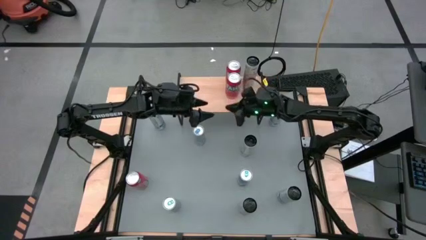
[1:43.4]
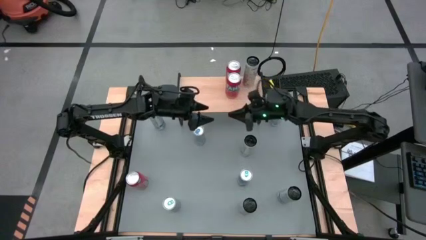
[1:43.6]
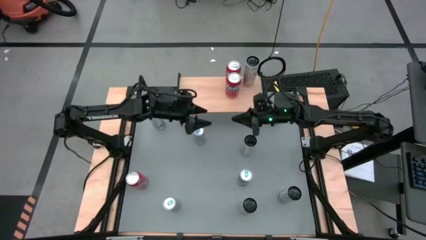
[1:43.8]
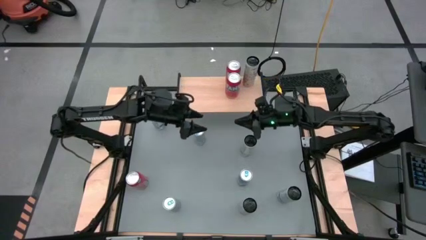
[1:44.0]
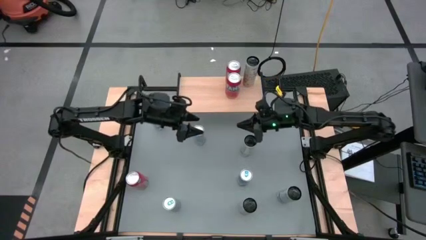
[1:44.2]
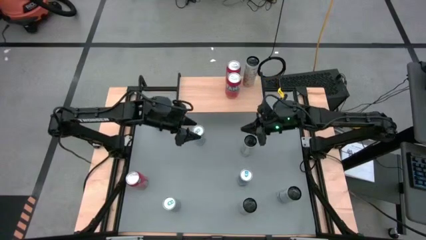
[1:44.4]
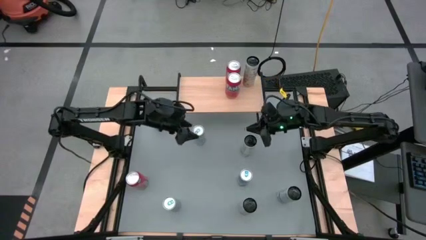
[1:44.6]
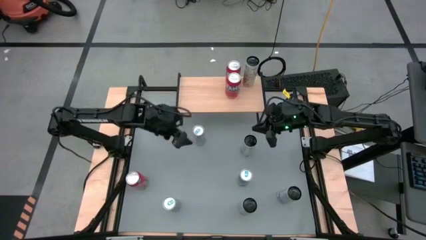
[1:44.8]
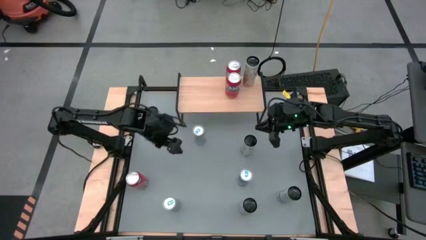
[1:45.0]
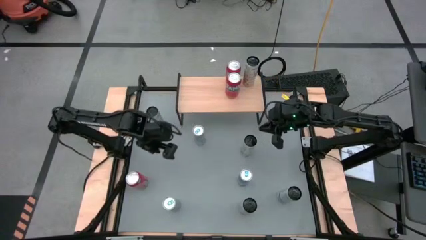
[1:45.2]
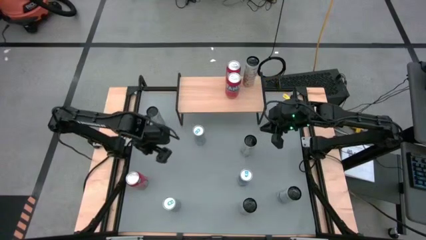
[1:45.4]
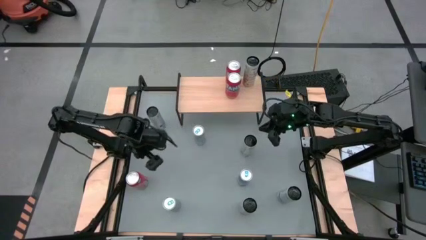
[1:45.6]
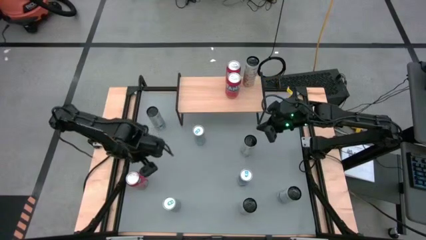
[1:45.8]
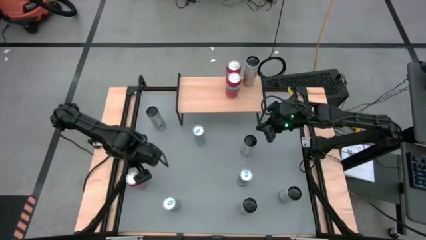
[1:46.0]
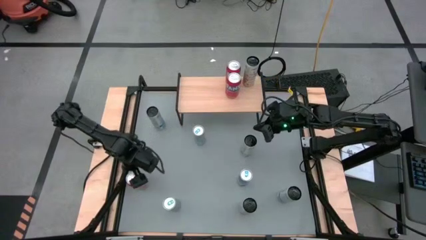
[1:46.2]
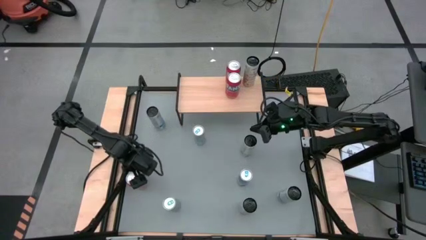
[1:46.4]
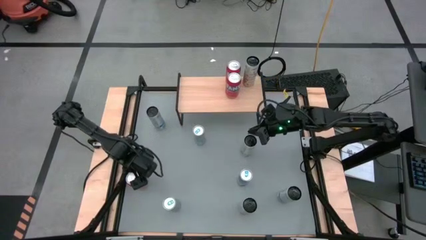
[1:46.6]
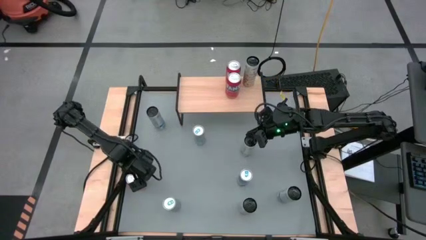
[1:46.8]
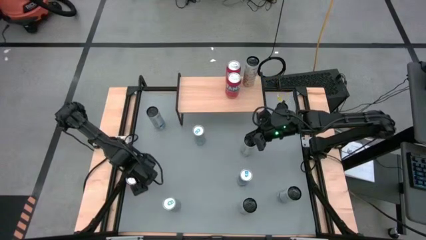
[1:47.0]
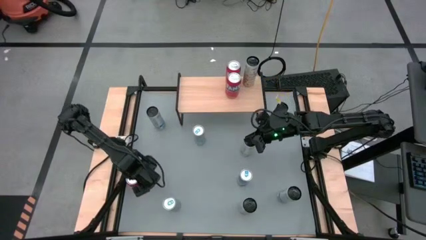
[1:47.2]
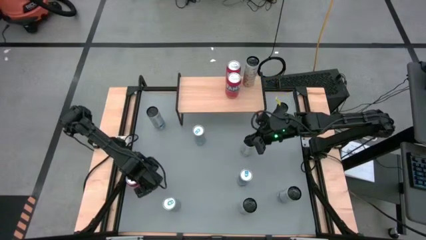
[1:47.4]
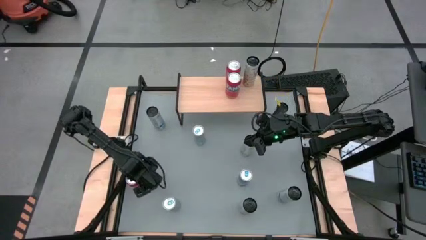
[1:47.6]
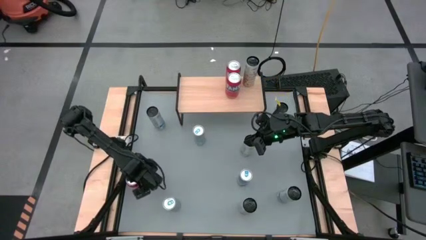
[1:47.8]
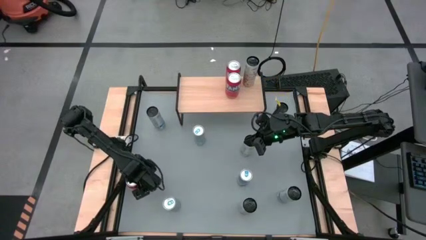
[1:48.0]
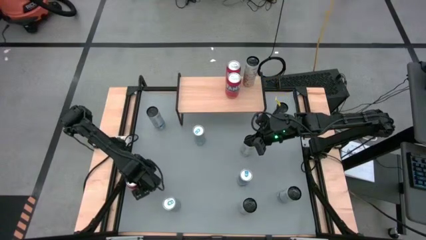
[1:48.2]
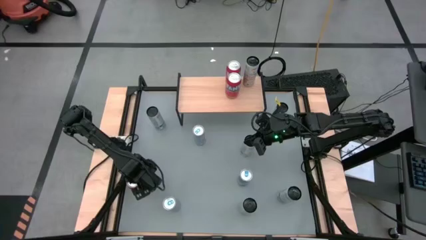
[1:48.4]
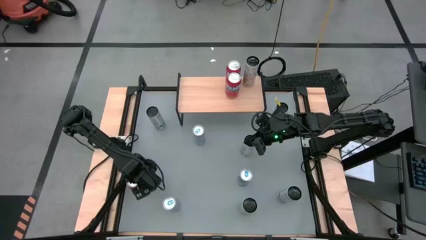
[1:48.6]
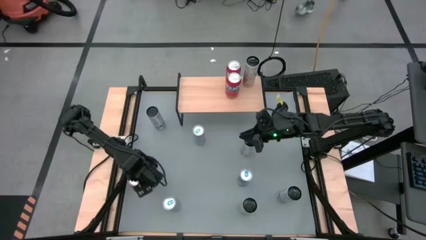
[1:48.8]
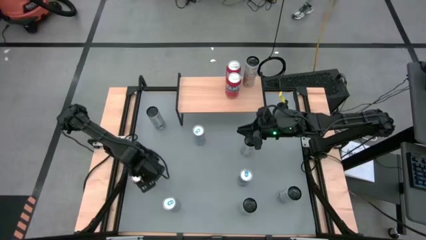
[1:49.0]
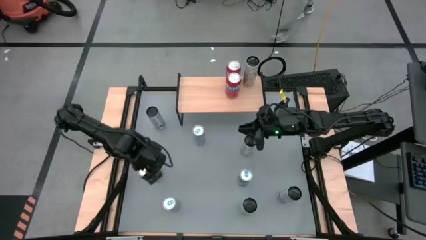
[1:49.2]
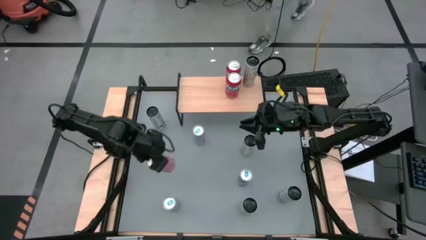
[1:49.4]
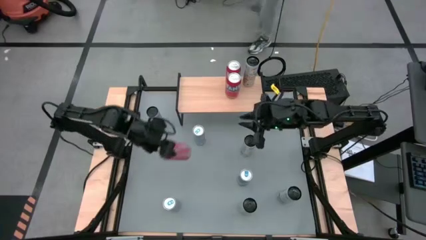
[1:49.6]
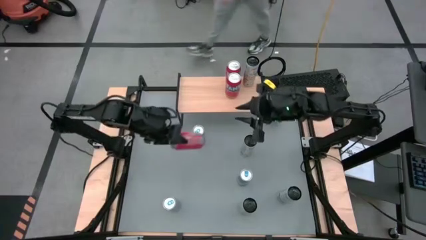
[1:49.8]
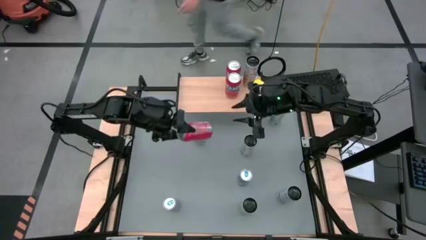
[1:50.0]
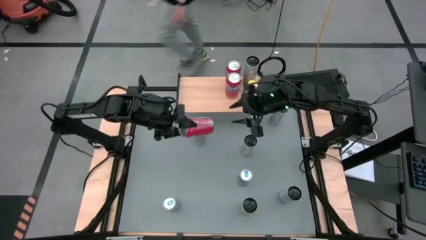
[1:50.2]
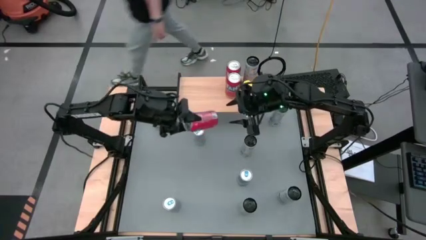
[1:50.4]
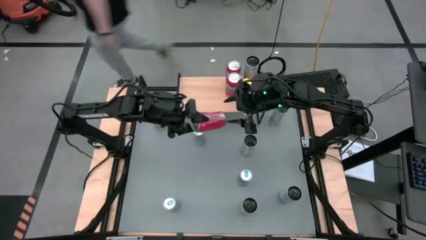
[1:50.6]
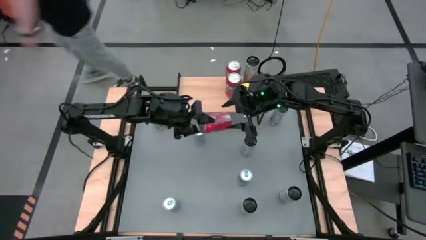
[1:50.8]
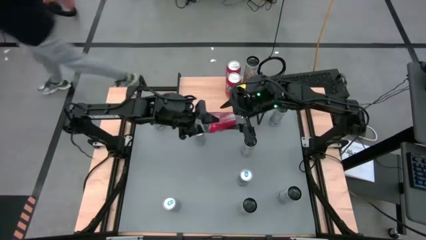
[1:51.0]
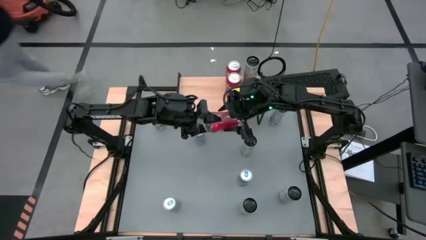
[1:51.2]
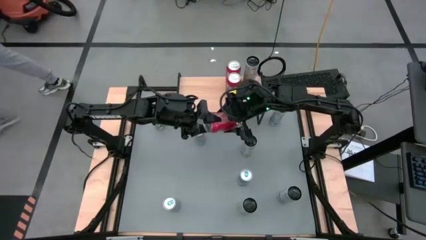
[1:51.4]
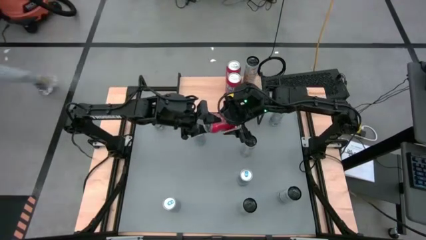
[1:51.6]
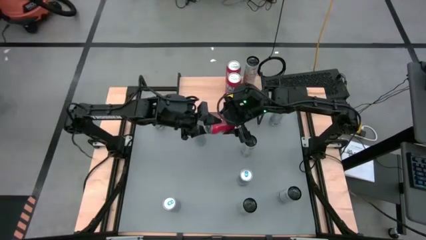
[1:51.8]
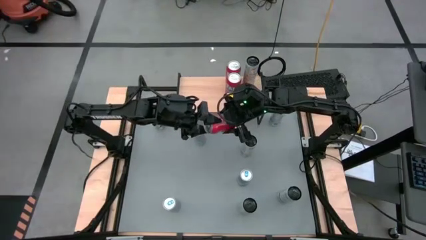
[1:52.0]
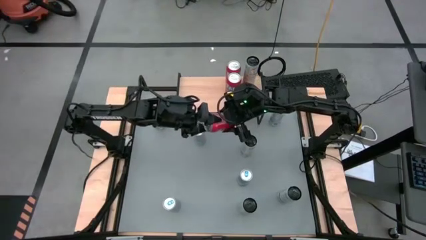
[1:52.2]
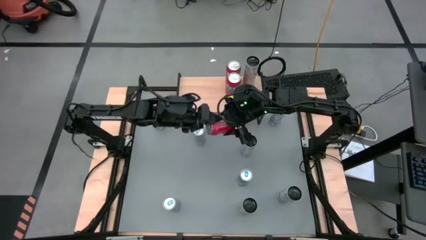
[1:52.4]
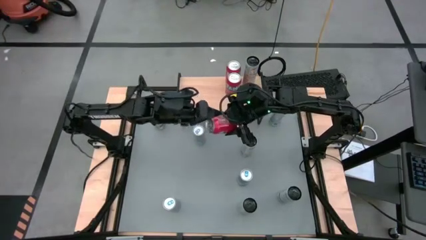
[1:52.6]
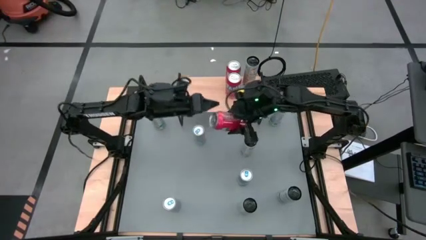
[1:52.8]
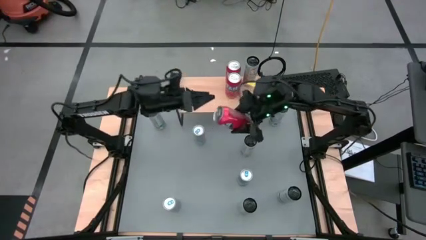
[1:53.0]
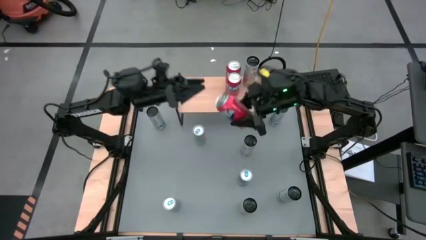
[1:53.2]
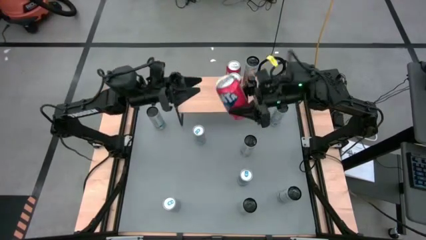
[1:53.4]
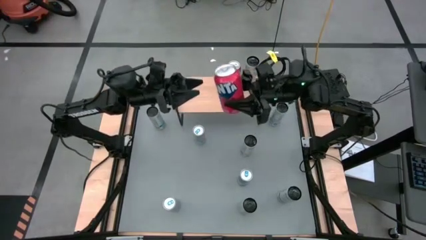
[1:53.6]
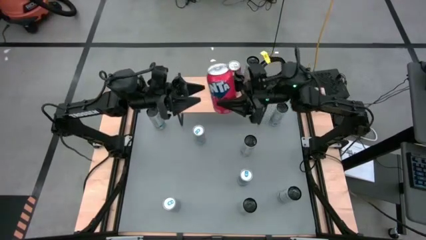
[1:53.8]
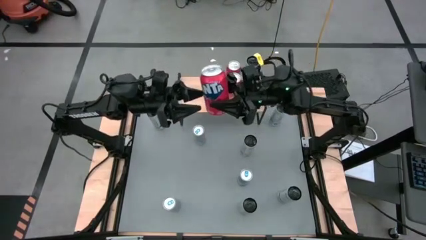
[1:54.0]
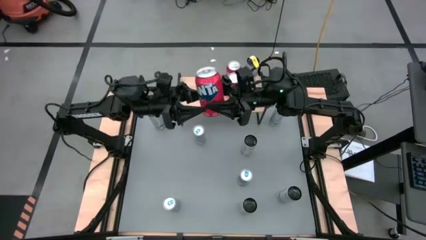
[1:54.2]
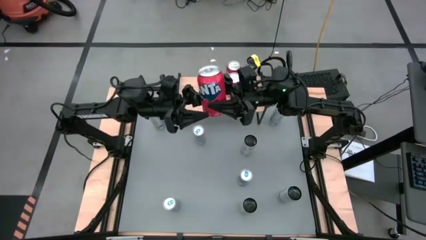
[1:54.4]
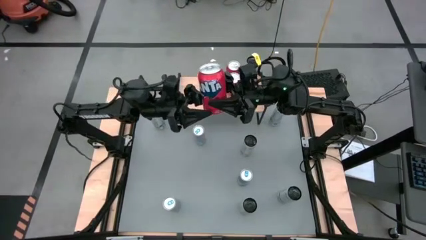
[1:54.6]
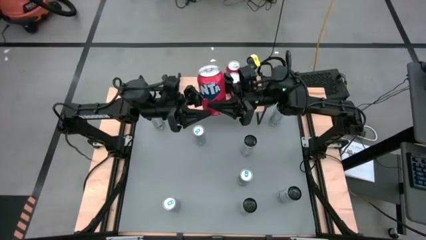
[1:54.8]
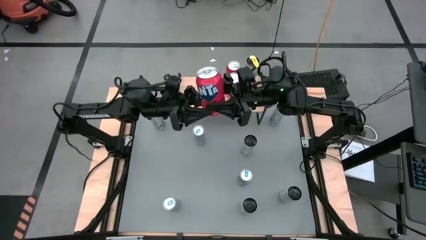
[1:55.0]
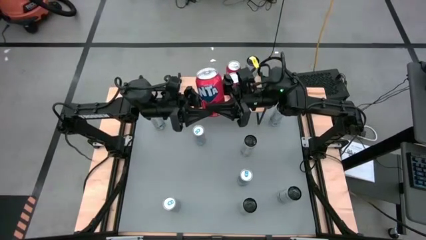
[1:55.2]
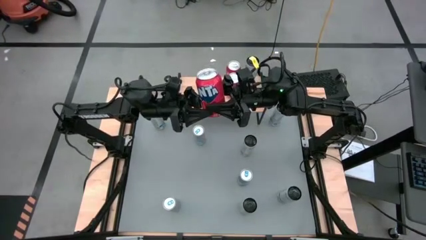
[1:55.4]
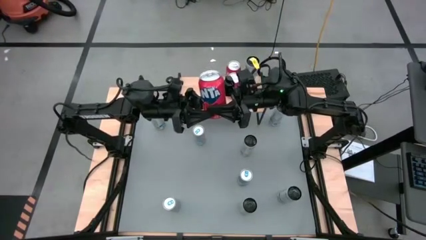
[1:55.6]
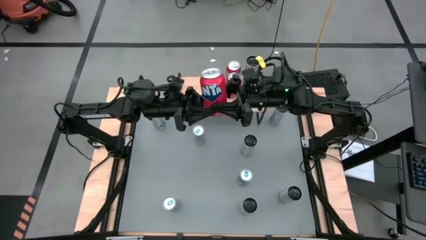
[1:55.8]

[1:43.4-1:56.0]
Task: Place canned beverage on shelf
Put the orange soda can on the shelf aligned with the other orange soda can

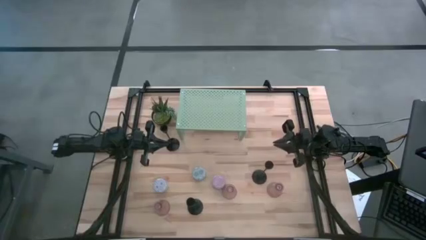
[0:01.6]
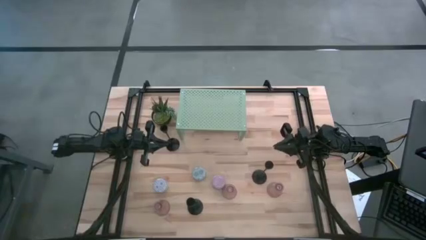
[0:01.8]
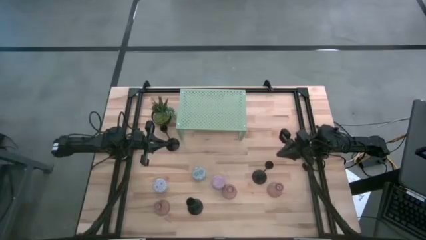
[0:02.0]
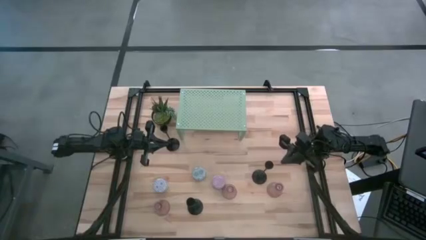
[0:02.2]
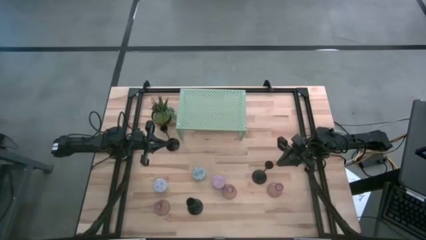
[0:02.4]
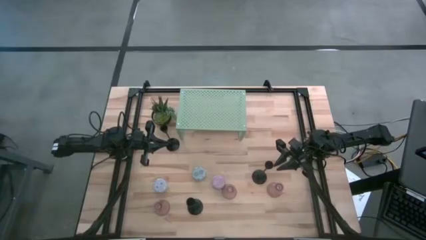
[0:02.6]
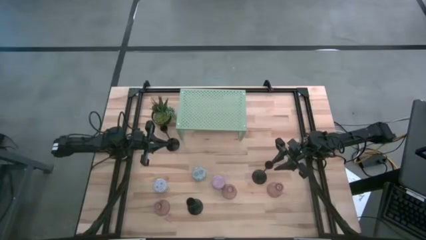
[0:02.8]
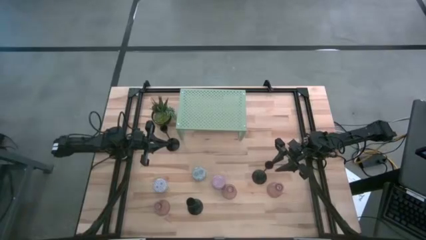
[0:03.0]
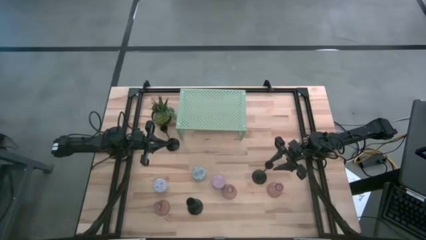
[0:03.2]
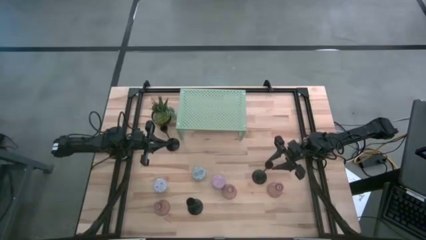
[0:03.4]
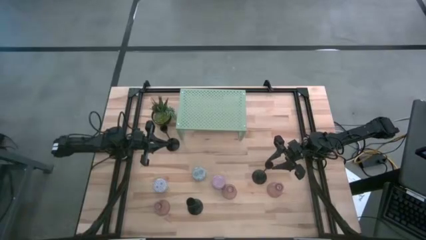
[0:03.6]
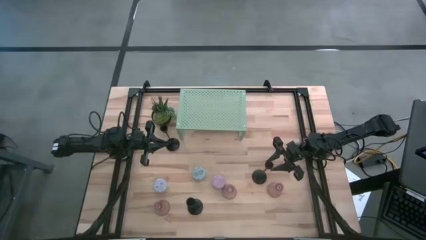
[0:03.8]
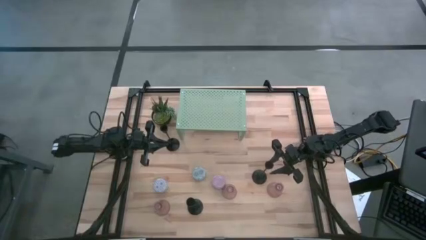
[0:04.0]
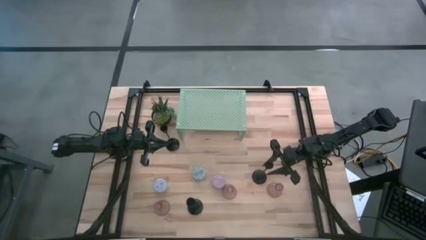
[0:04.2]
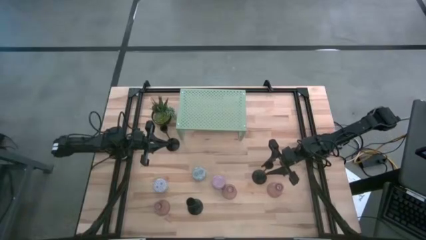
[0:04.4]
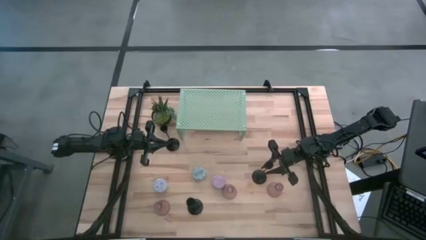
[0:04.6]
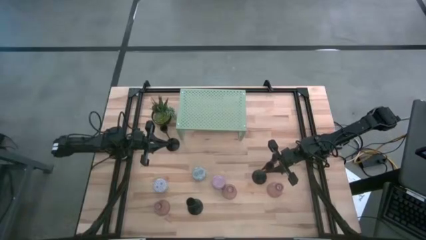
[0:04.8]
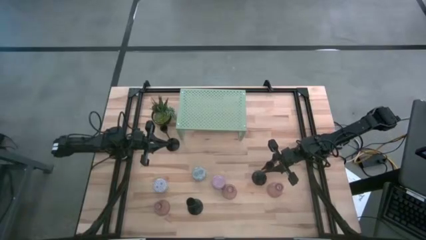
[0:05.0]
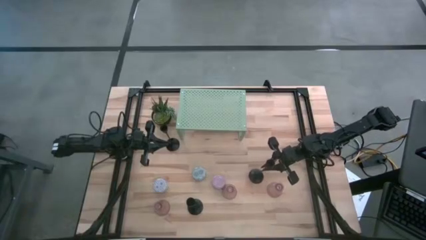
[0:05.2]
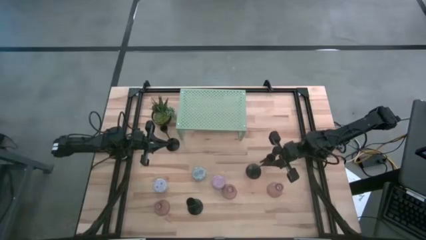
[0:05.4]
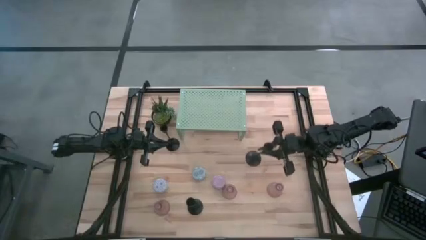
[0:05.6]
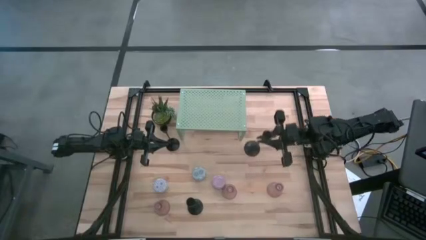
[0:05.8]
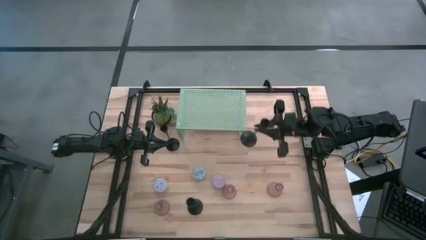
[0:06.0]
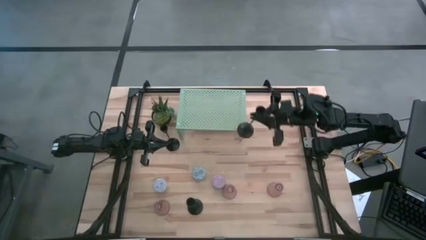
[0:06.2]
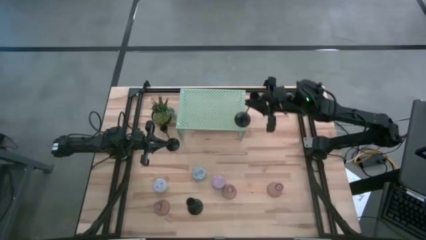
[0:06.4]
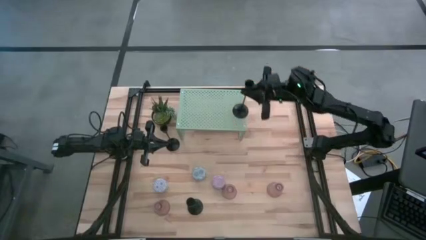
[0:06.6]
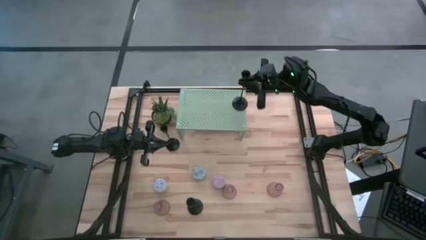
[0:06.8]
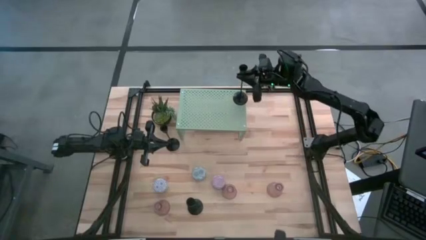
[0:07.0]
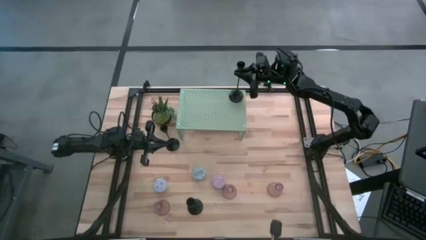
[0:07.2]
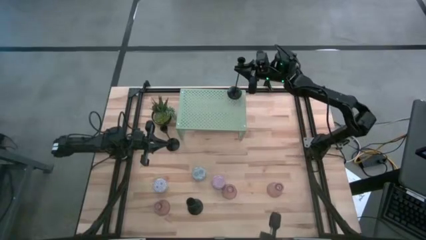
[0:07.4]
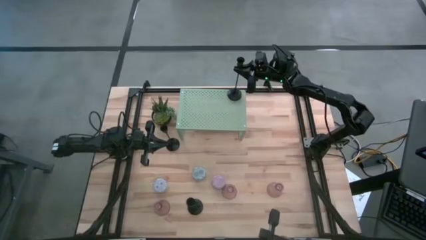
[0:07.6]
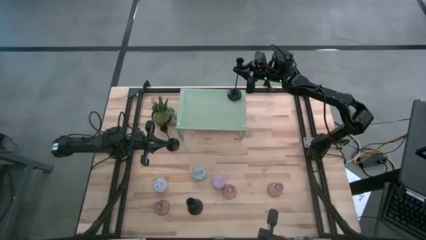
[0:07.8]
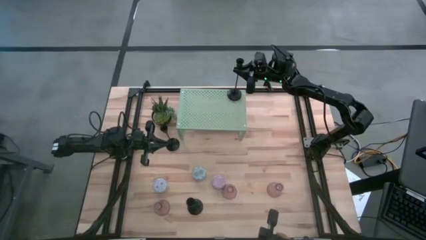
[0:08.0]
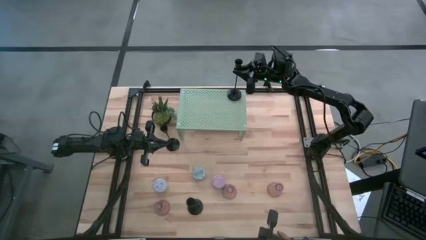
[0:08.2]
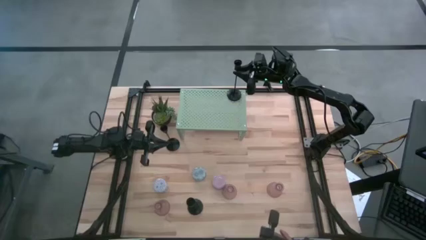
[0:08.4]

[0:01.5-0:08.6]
Task: Pick & Place candle stick holders
Put the right black candle holder on the shelf
